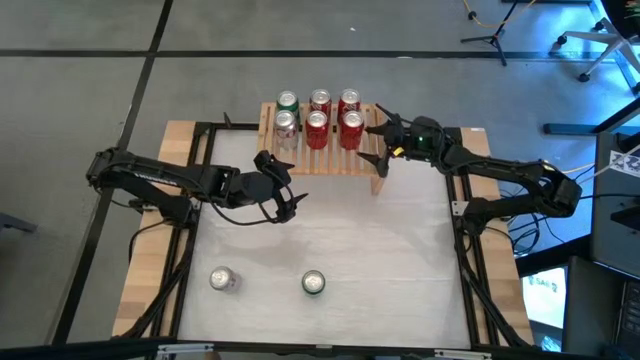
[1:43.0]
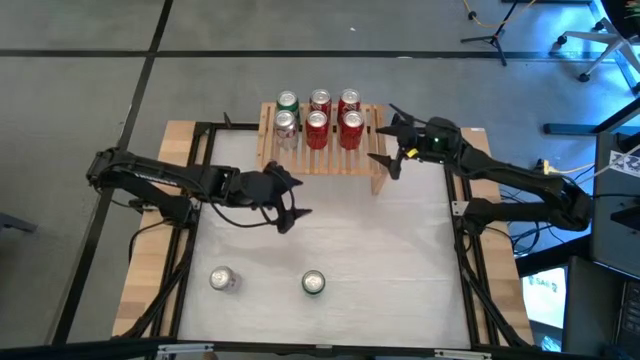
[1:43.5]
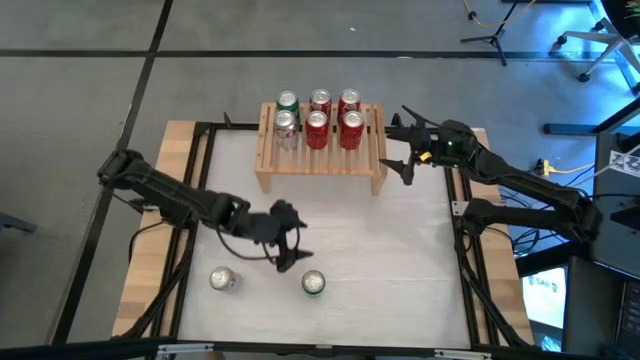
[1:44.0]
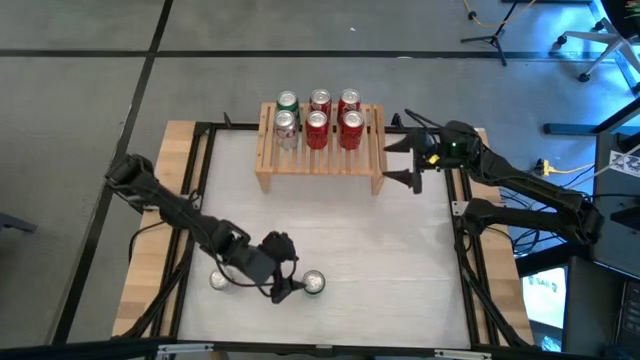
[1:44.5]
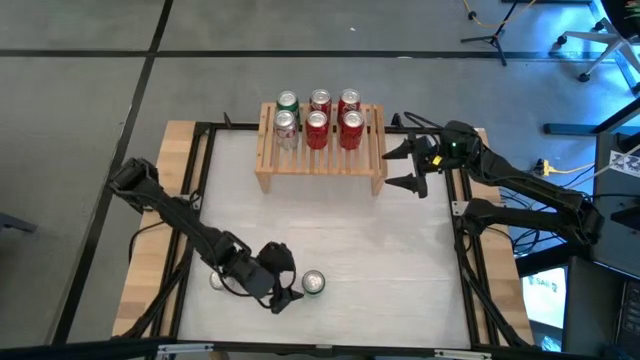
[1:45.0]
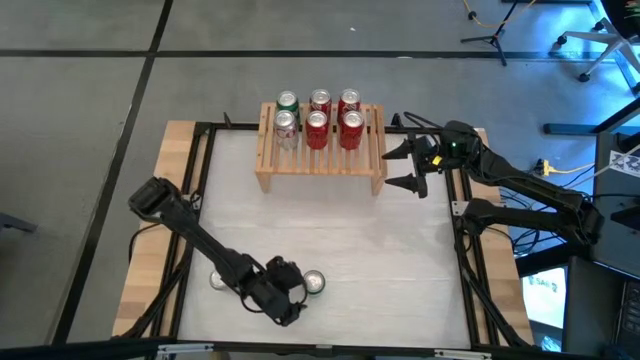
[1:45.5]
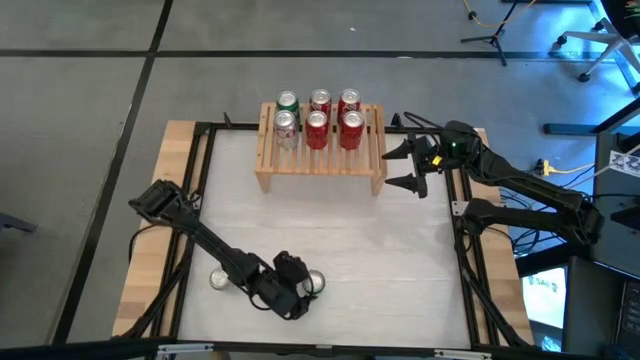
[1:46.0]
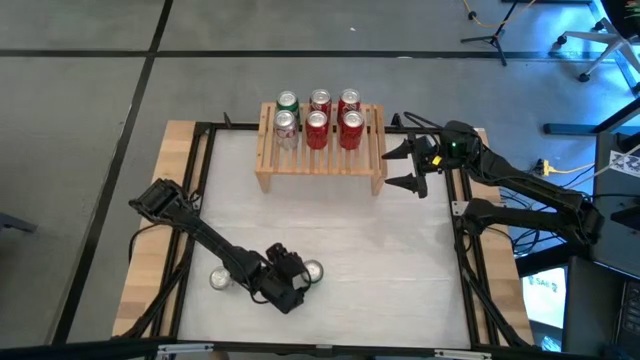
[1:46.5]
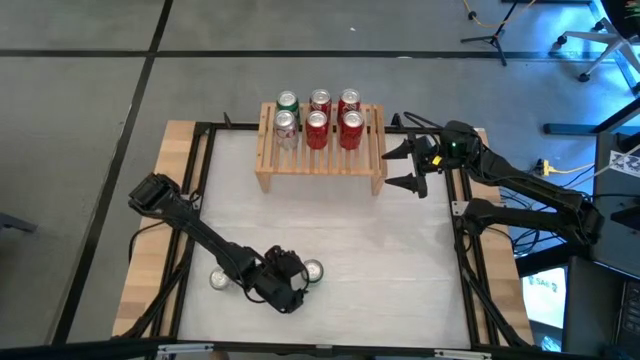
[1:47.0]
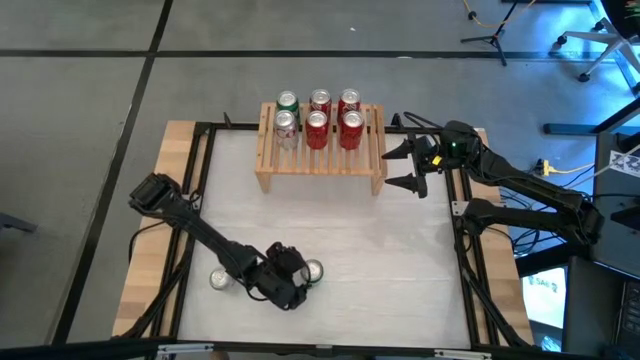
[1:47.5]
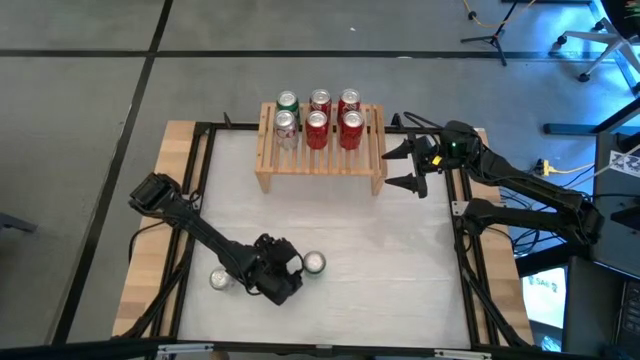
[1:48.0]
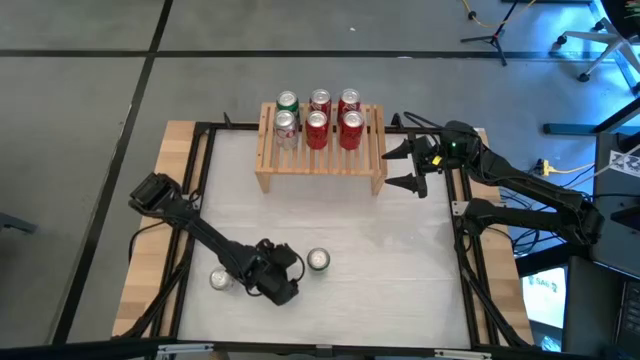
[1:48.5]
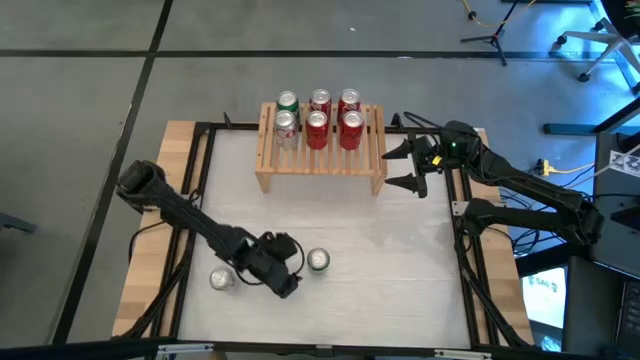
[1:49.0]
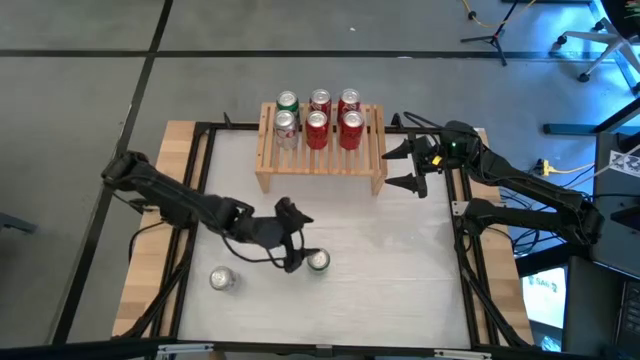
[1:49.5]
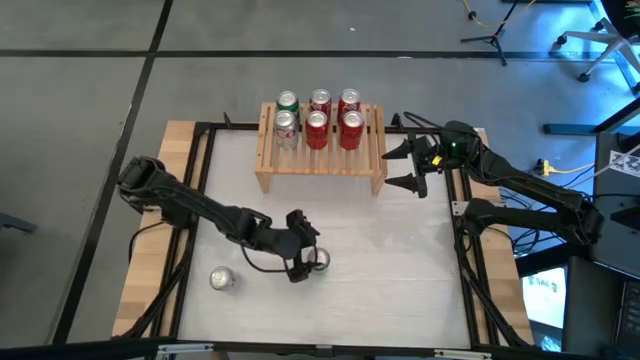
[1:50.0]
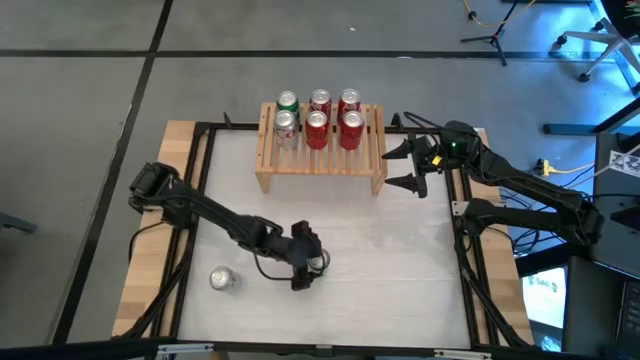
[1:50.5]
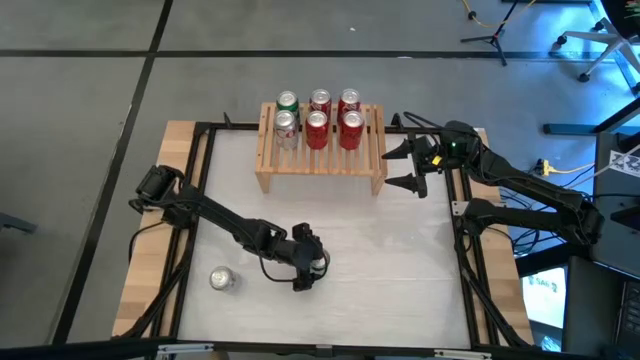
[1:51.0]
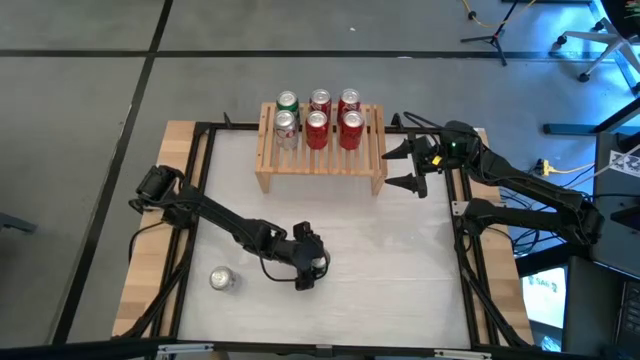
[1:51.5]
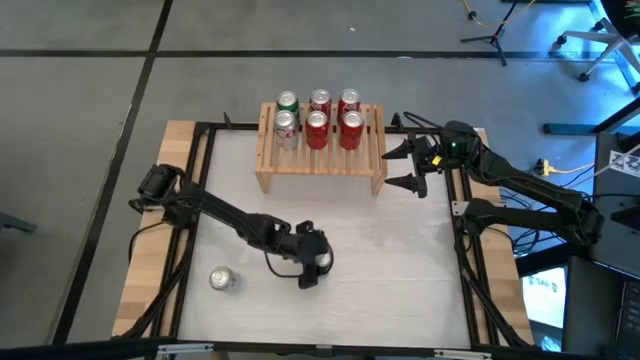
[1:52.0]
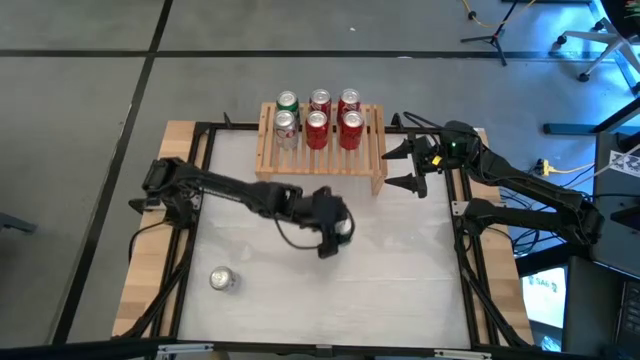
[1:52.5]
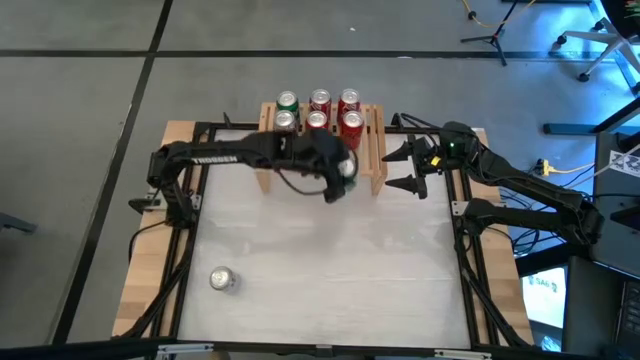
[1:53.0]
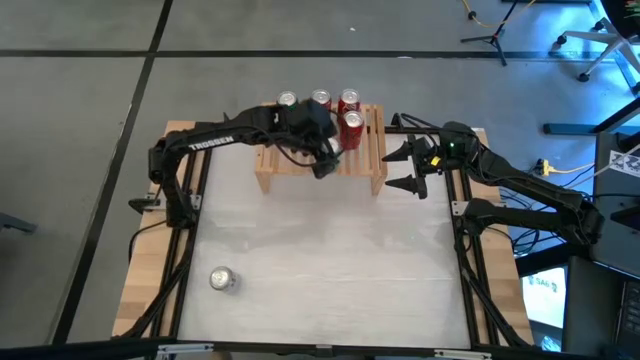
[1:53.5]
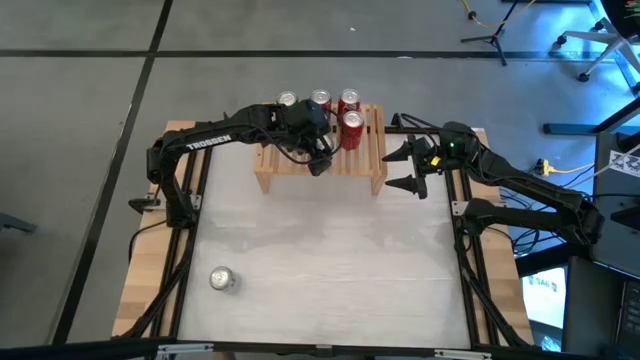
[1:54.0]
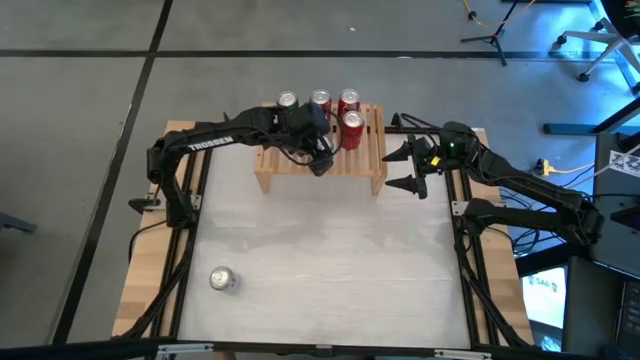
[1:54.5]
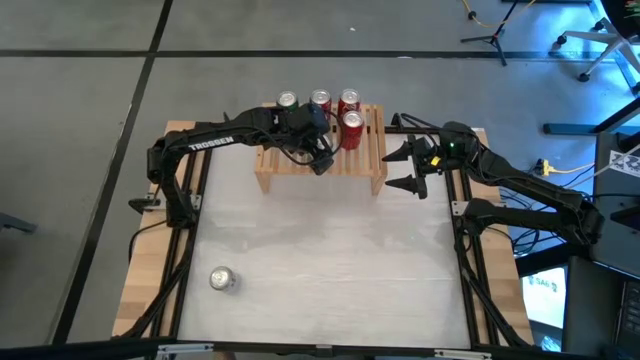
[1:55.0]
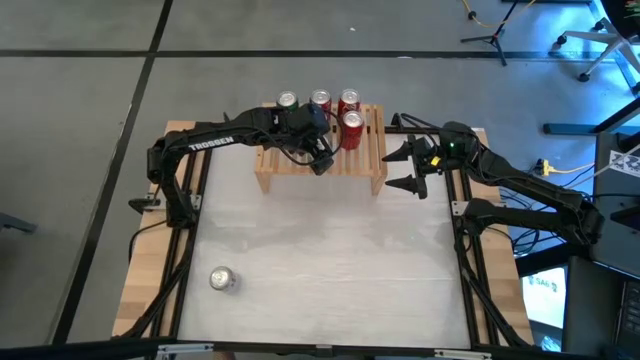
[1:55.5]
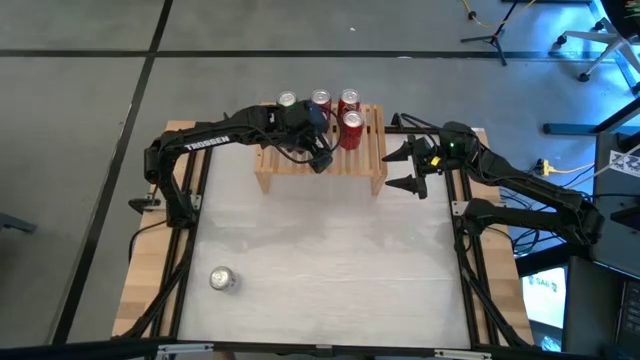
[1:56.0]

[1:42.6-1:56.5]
Task: Place canned beverage on shelf
Put the green soda can on the shelf aligned with the red/black soda can

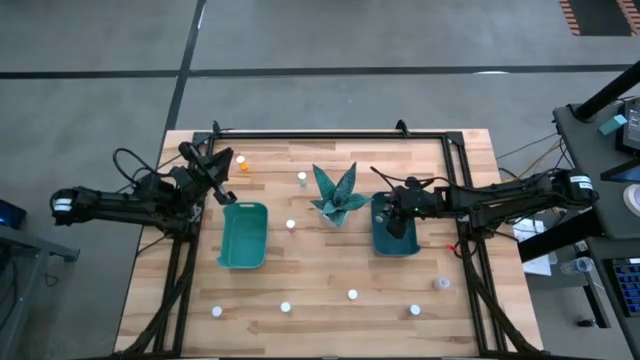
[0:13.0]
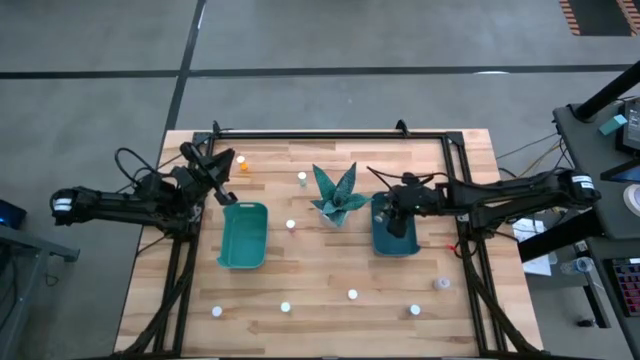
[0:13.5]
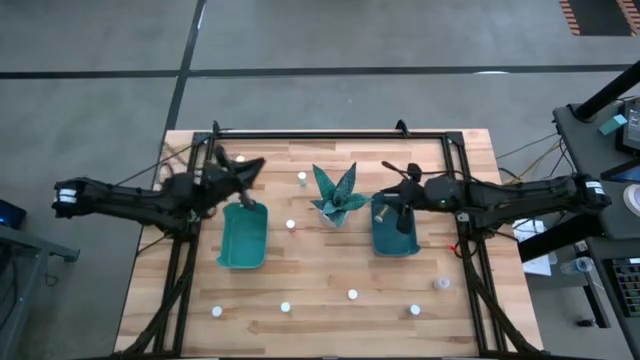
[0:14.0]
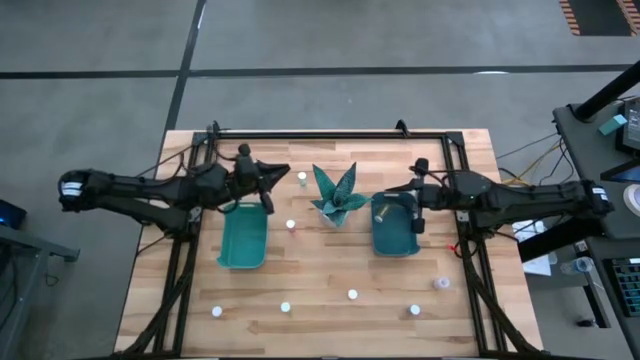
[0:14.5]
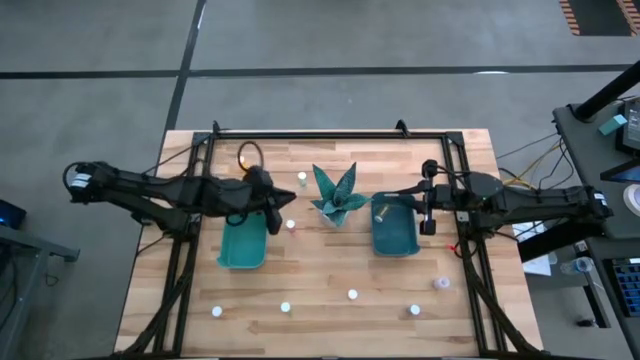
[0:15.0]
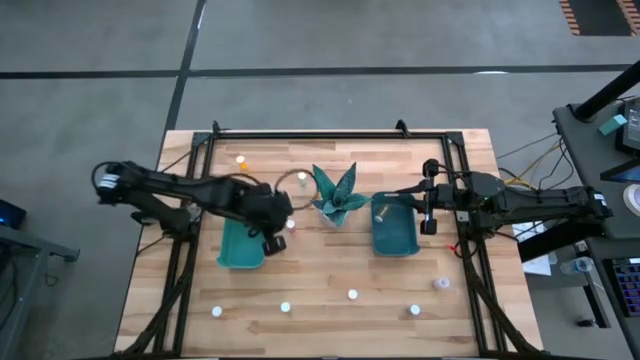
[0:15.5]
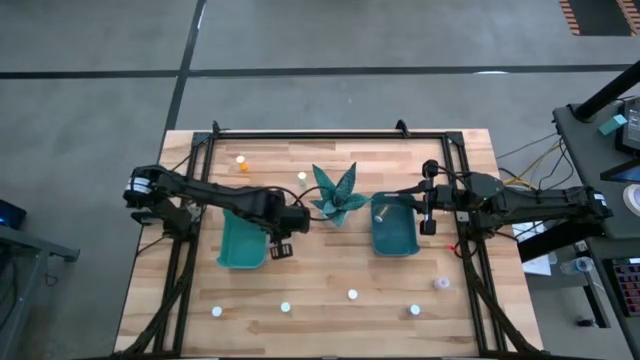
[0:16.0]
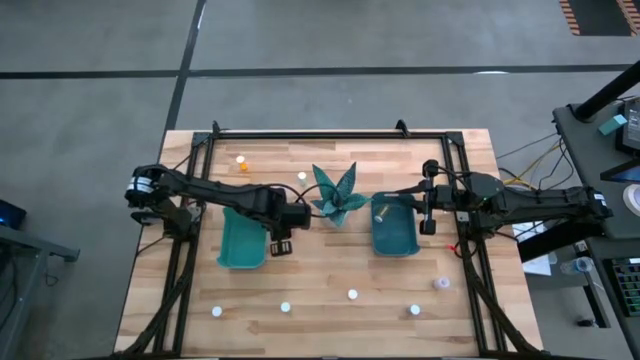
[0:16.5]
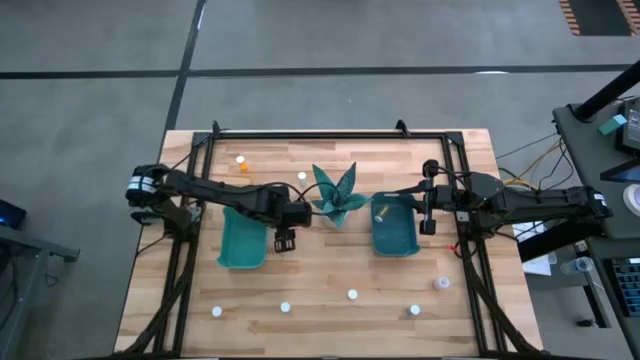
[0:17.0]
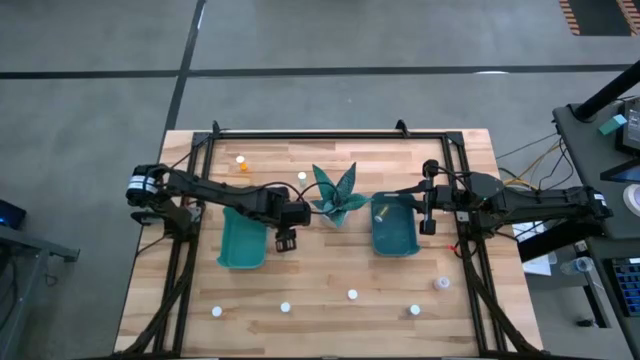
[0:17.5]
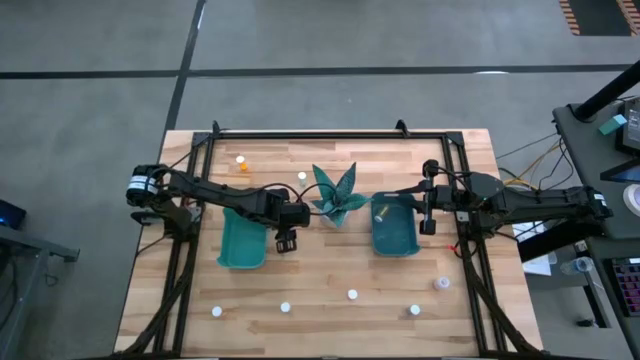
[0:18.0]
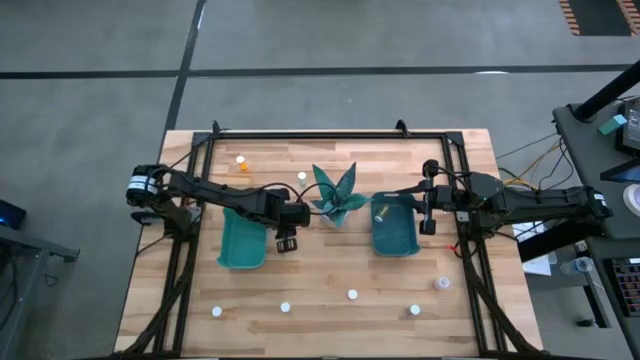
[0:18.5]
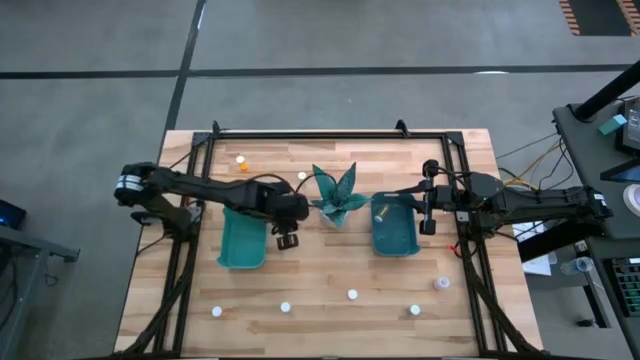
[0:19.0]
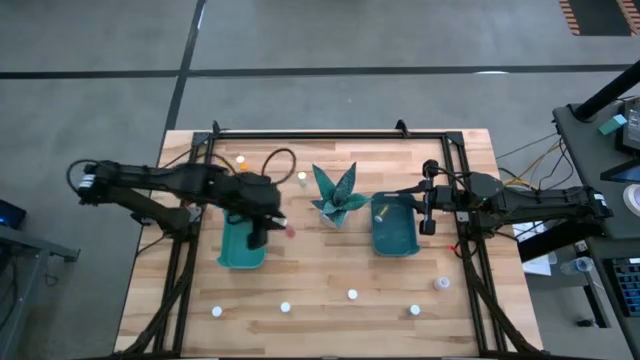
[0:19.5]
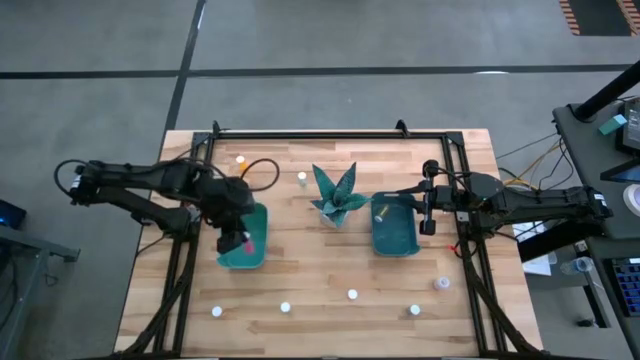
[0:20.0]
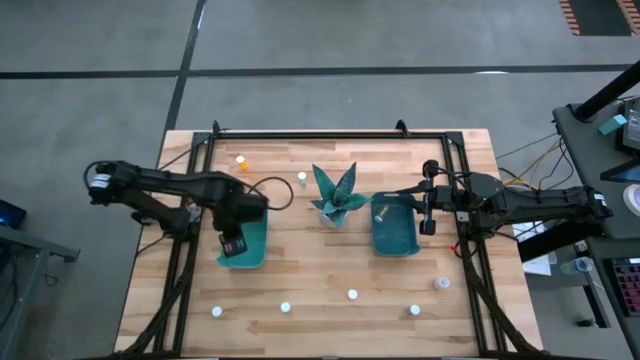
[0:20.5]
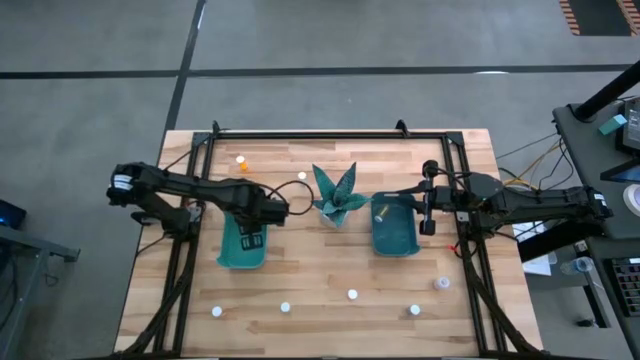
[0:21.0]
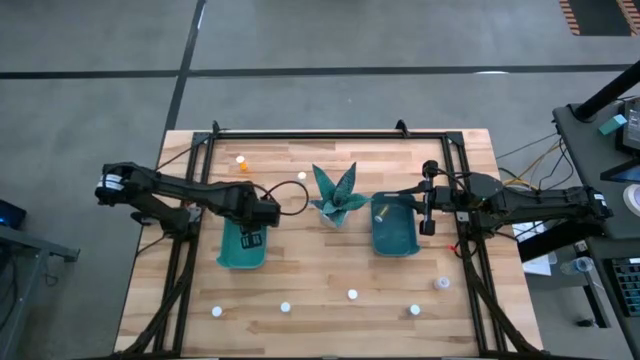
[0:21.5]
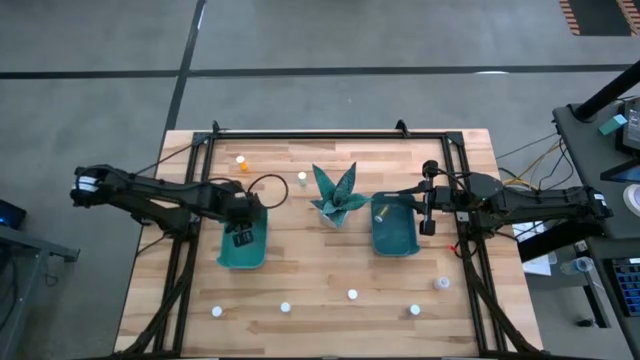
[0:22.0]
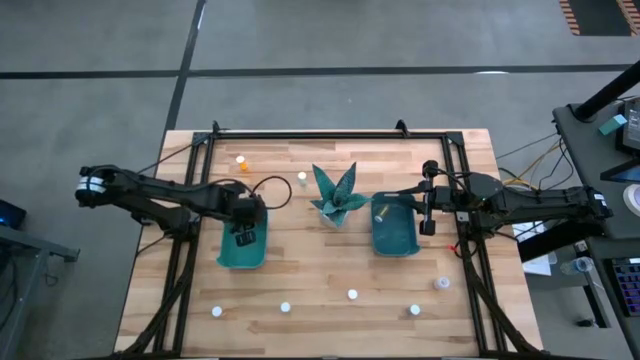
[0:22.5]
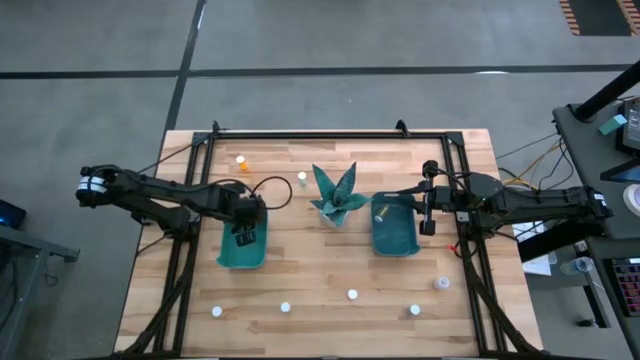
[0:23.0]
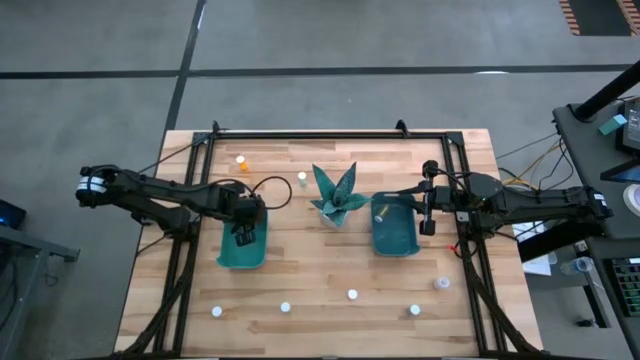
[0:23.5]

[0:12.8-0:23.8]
Task: Pick and place medicine bottles into bin by pill shape (circle, oval)
Put the pink capsule bottle into the green bin
